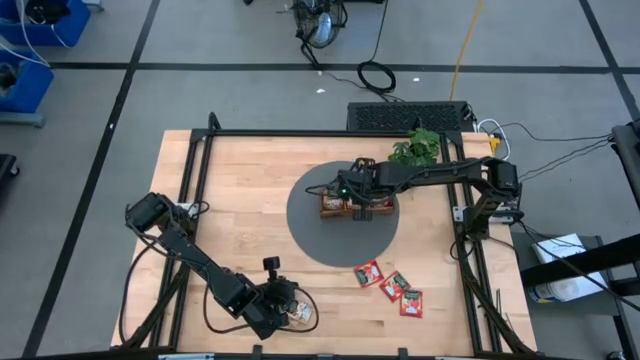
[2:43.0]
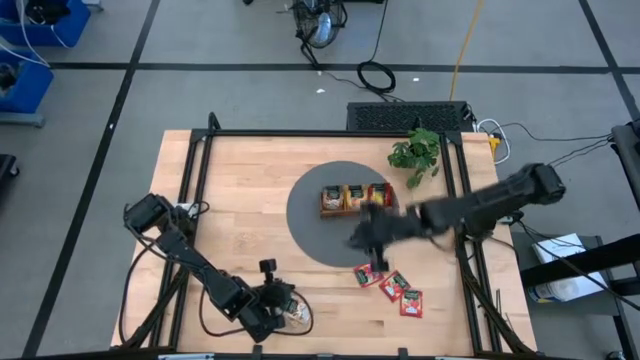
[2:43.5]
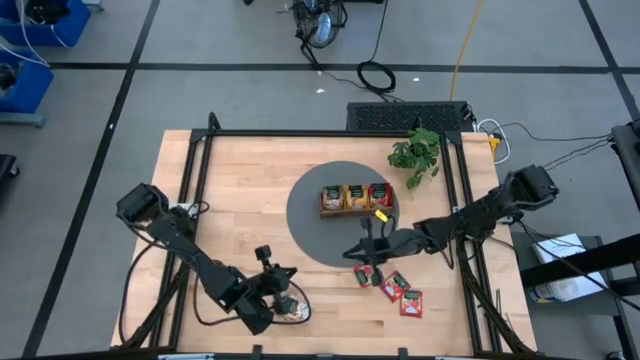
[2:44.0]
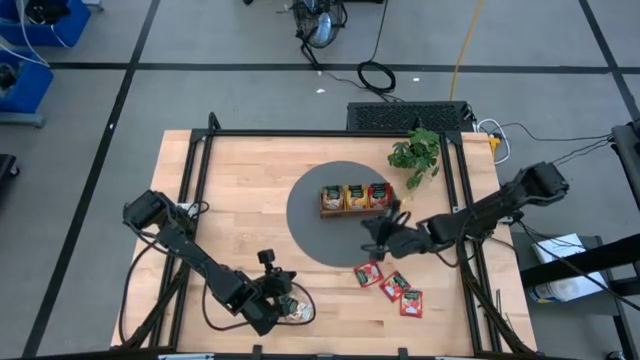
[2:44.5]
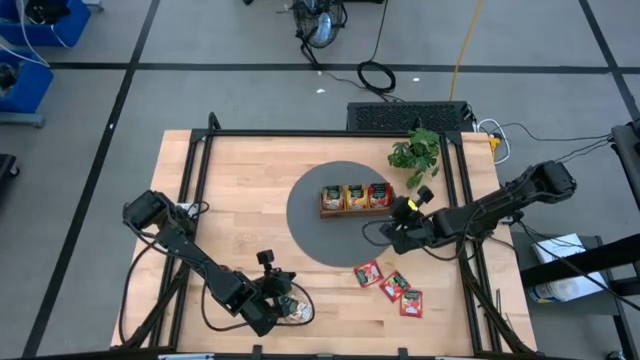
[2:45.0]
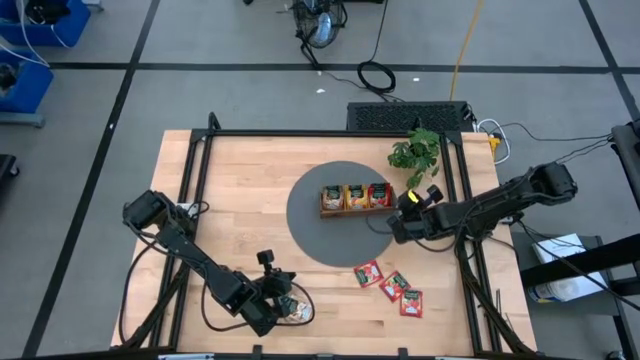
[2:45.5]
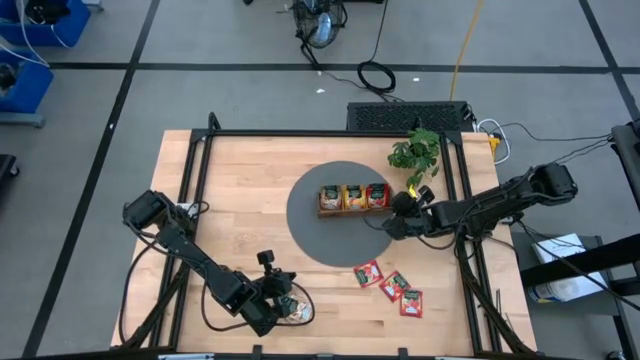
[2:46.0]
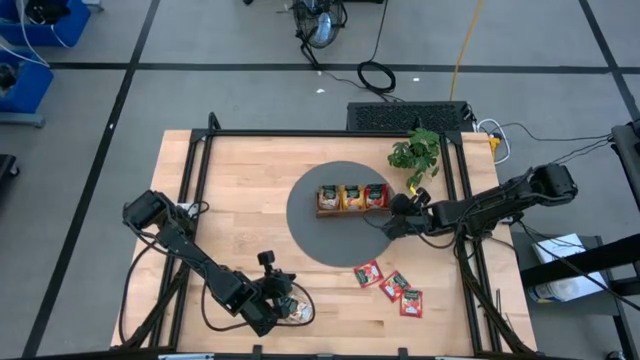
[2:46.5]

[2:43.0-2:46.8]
Task: Pick & Place Tea
Adjust the wooden organizer

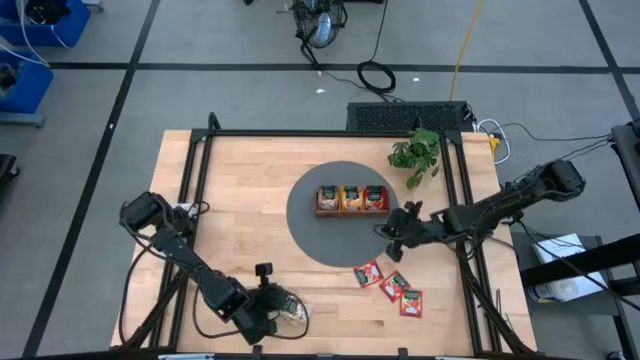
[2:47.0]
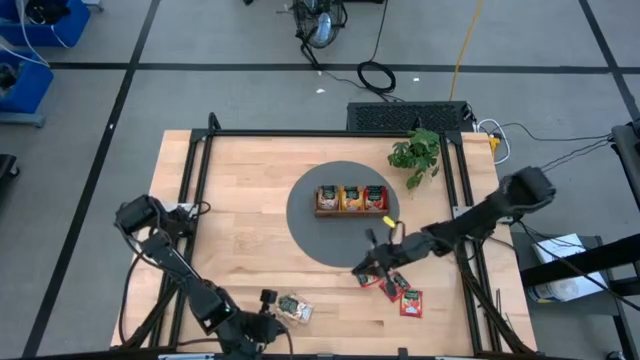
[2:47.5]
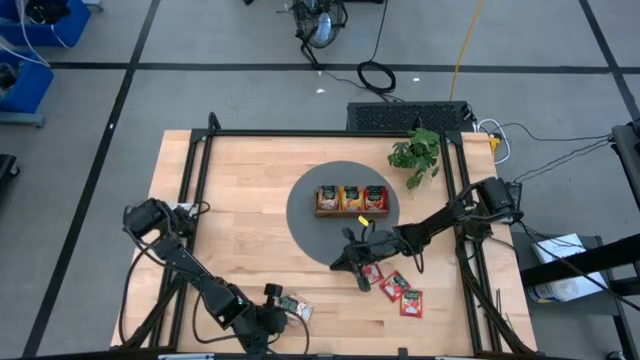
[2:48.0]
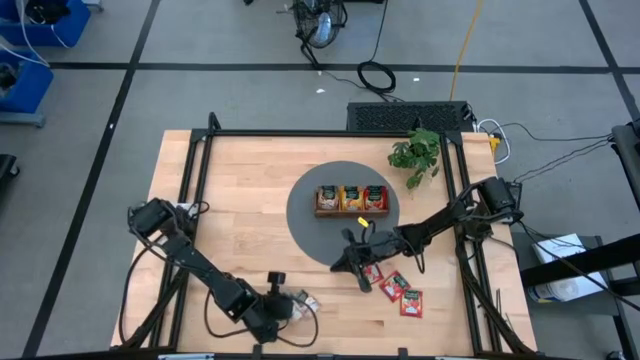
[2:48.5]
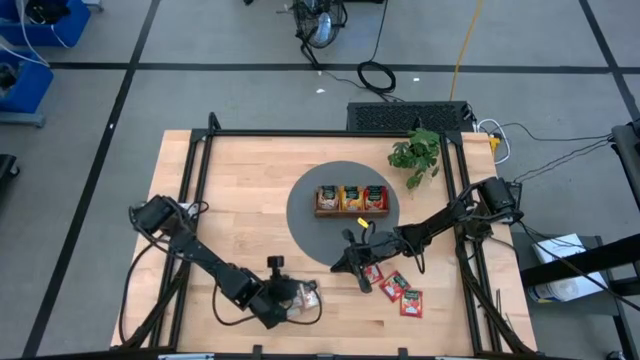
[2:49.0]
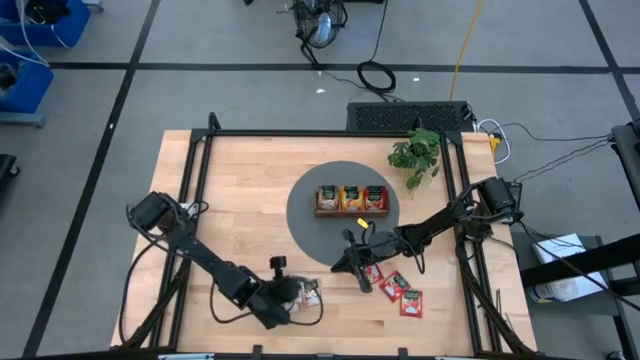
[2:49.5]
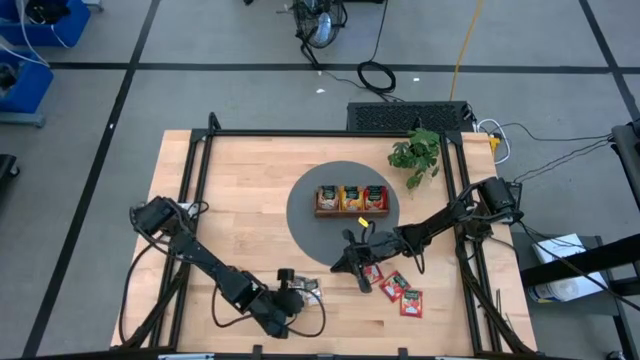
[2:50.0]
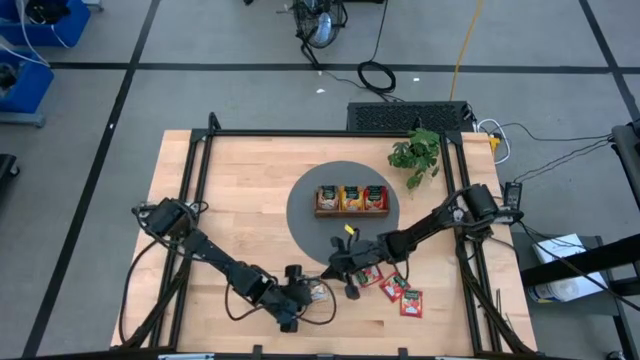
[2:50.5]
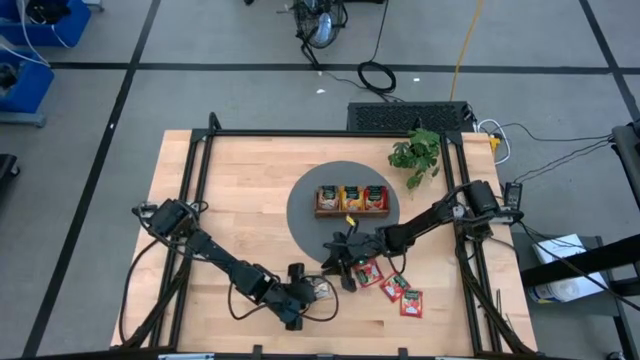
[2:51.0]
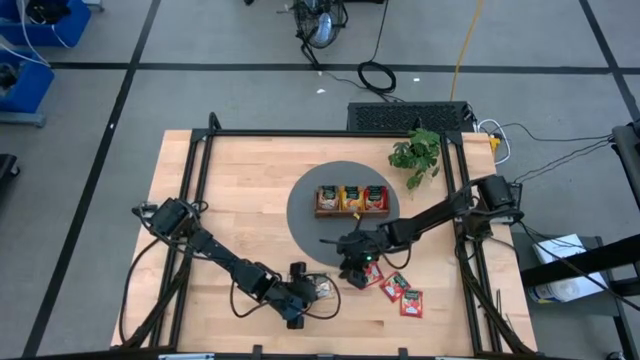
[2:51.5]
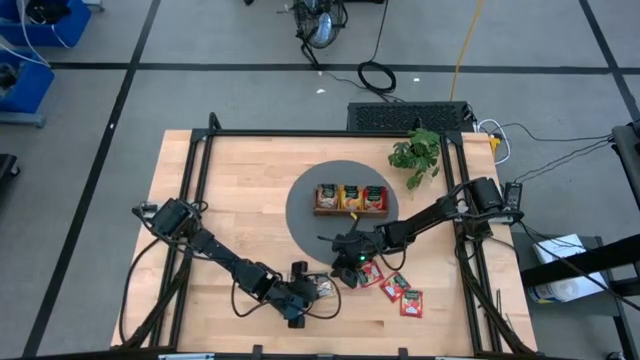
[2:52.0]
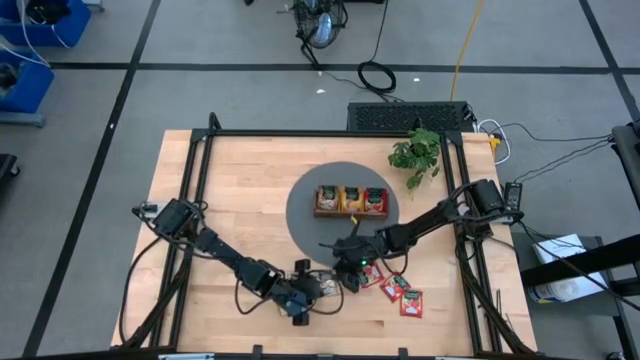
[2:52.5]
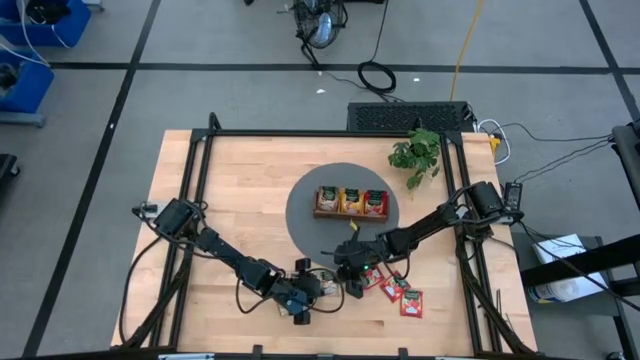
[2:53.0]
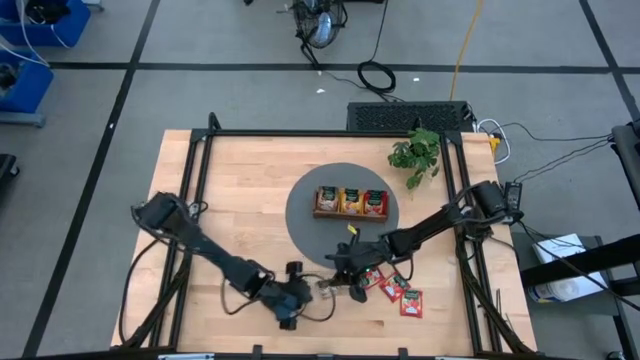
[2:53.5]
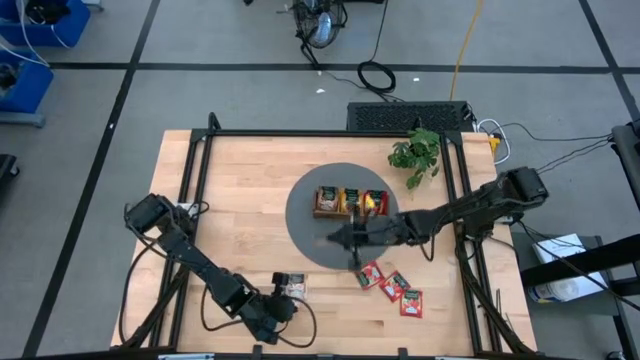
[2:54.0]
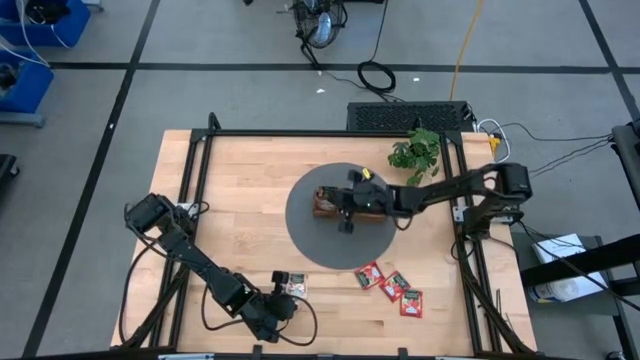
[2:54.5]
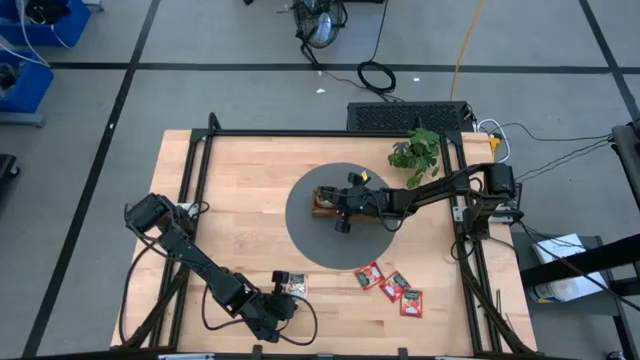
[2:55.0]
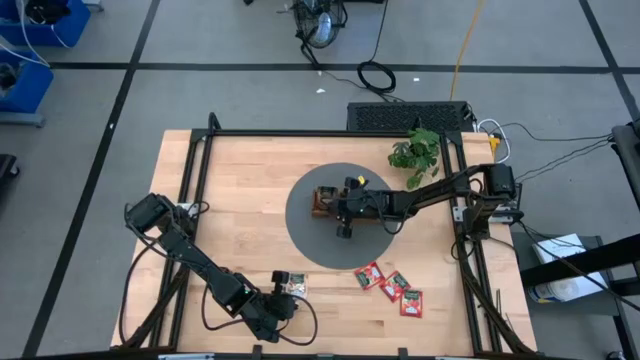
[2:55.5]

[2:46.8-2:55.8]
Put the brown tea bag to the left section into the wooden organizer

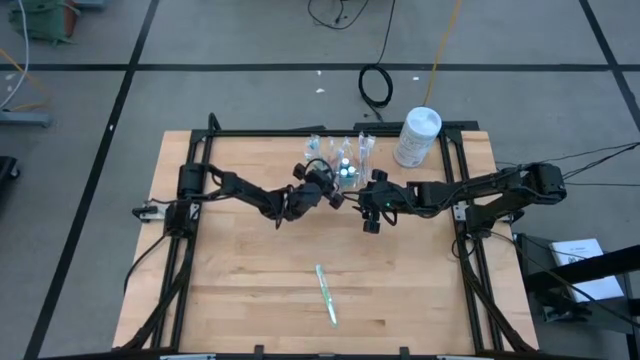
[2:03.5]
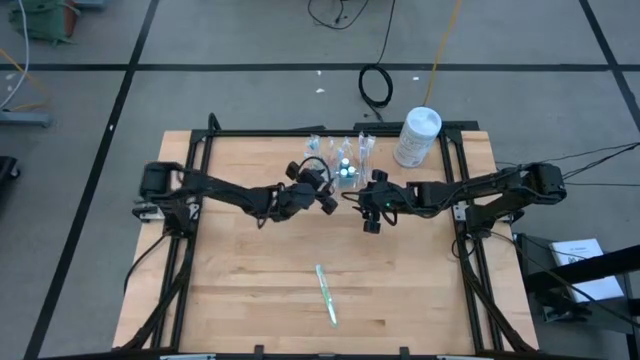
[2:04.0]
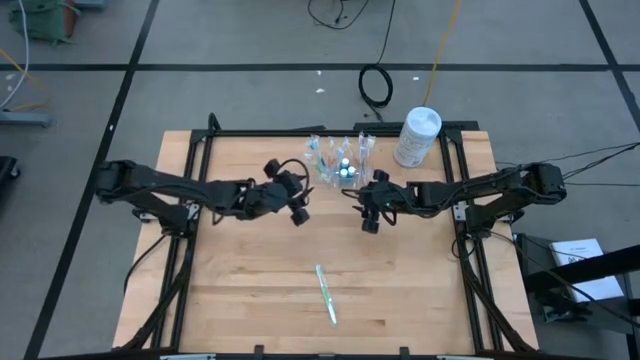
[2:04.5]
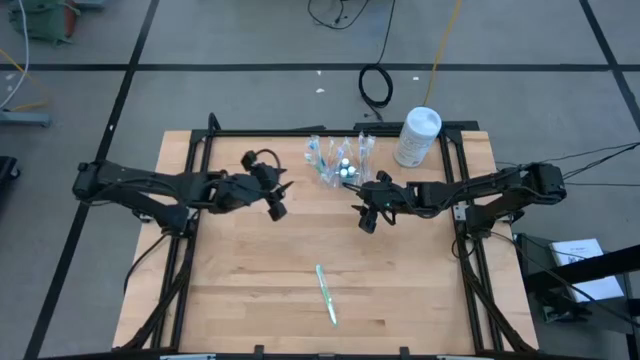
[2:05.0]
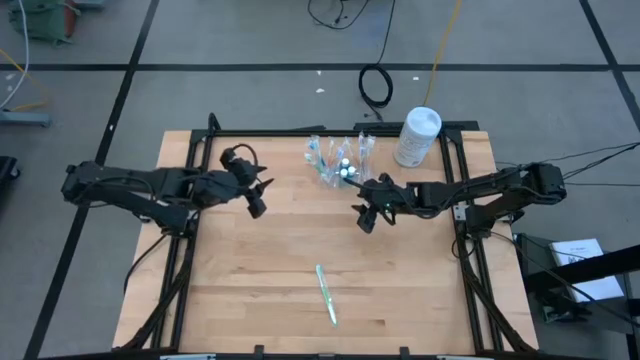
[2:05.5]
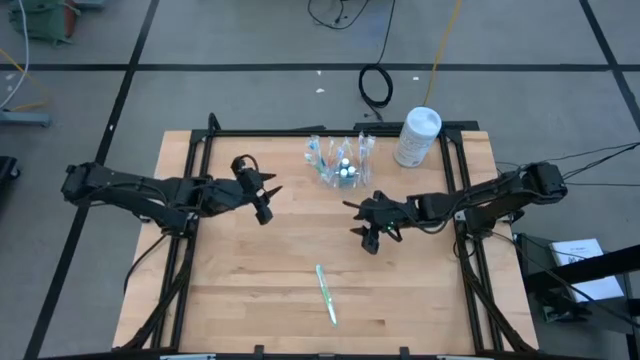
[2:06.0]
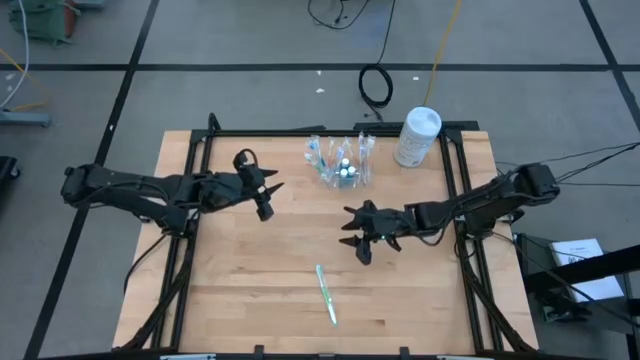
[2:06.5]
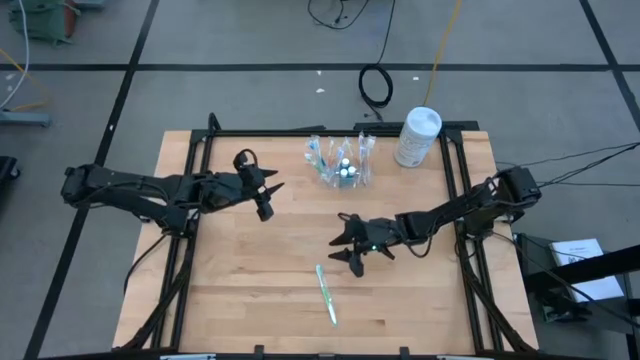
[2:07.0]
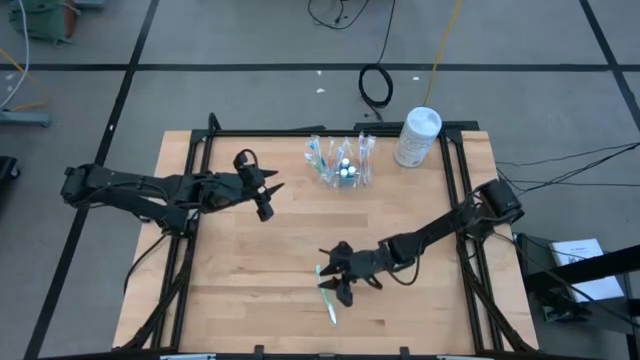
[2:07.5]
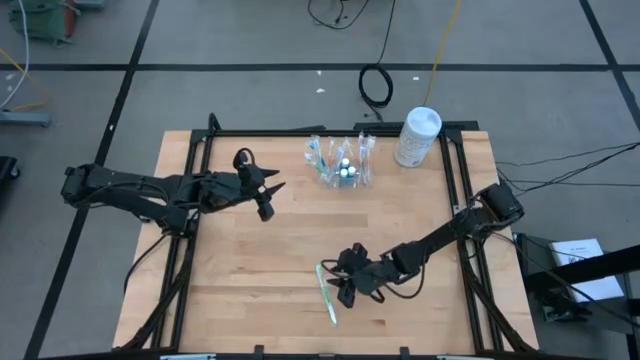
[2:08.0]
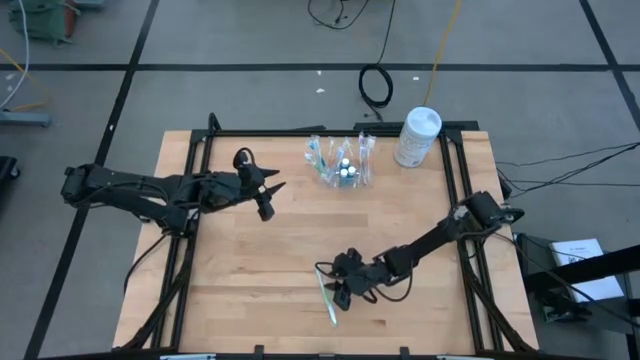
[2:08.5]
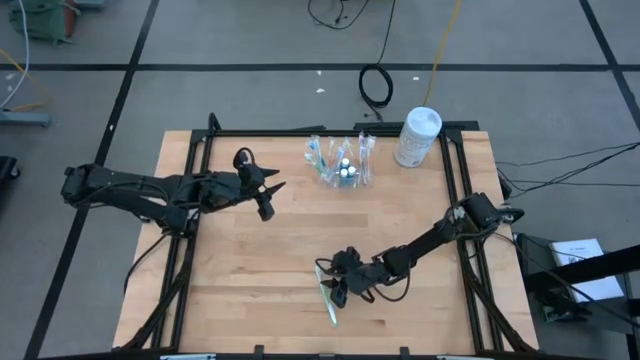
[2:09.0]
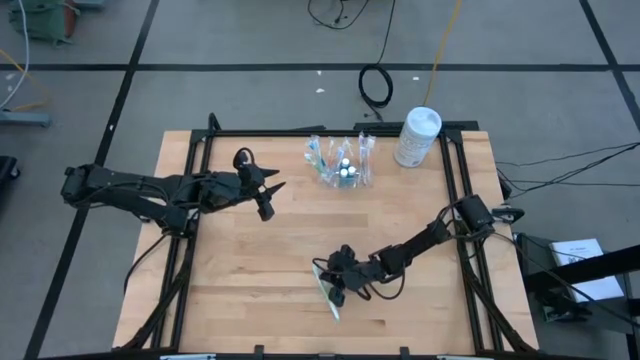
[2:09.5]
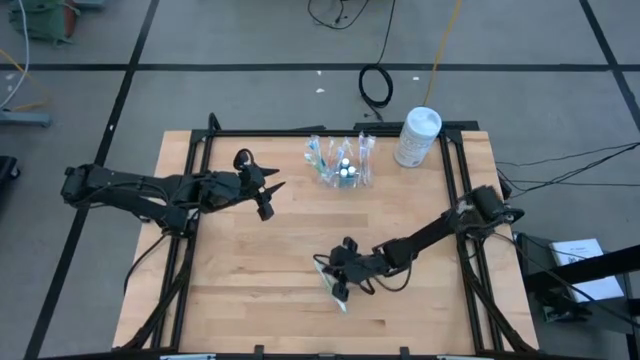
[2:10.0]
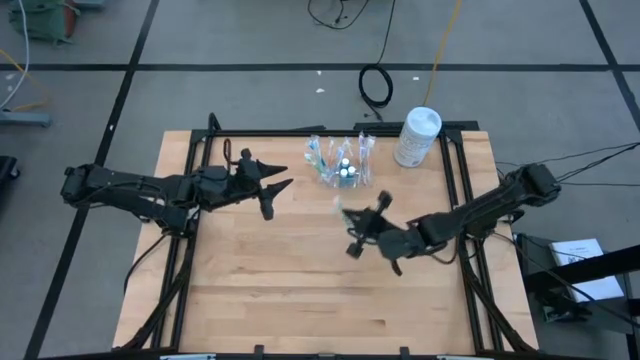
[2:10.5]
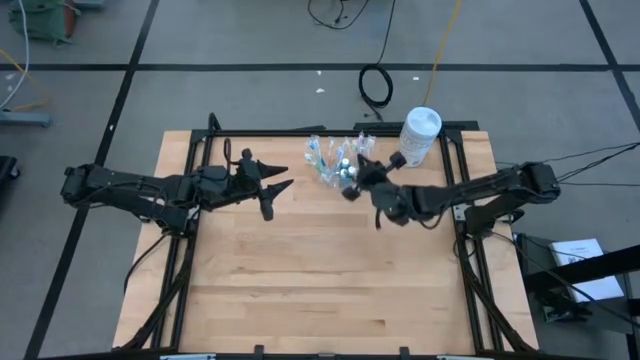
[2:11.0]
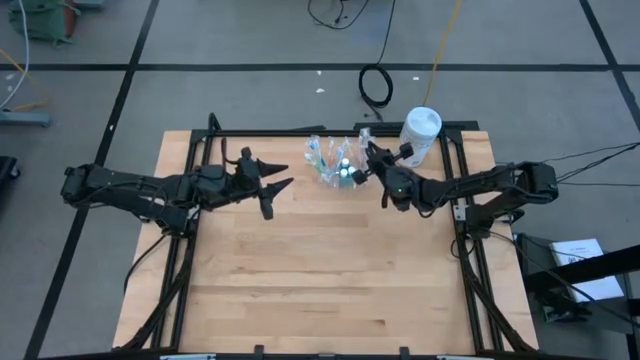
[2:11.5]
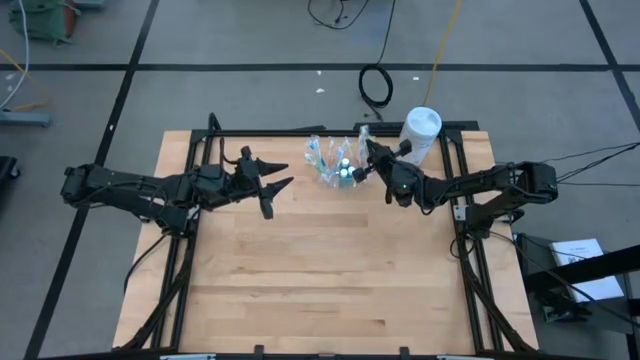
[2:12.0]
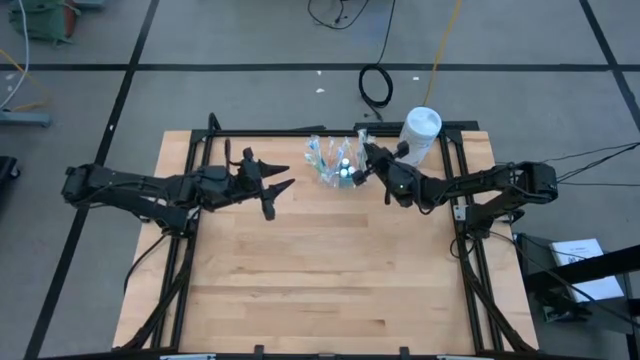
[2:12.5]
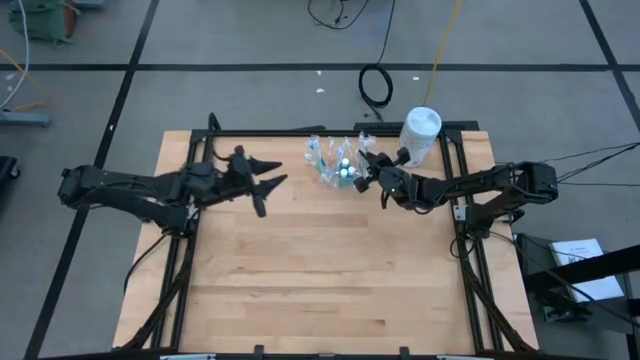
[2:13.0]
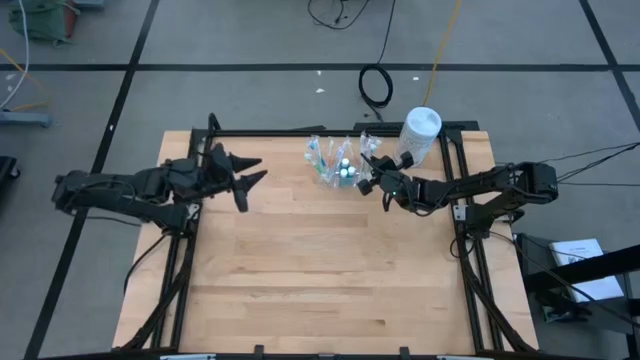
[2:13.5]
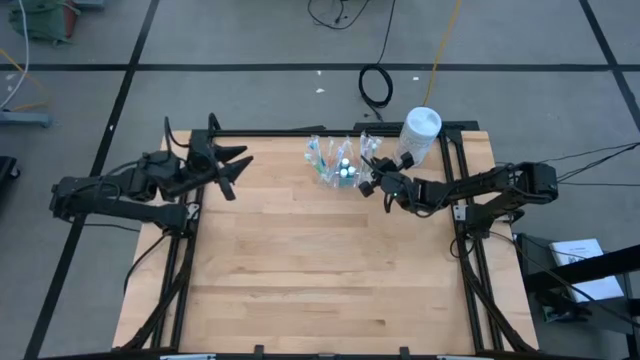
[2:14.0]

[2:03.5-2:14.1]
Task: Pick & Place toothbrushing station
Put the green toothbrush into the transparent organizer
